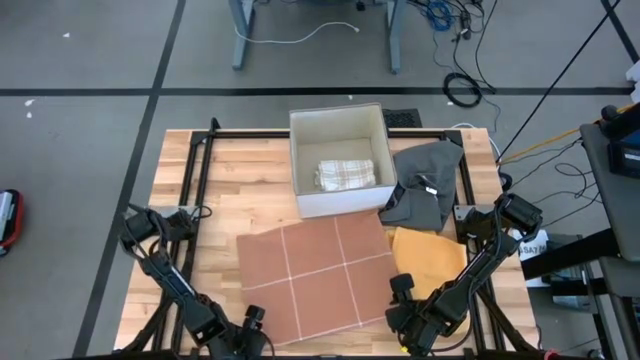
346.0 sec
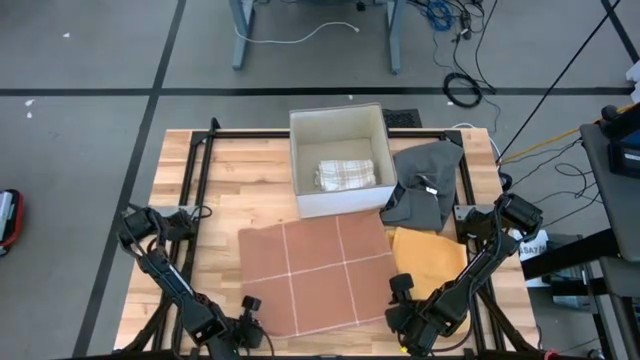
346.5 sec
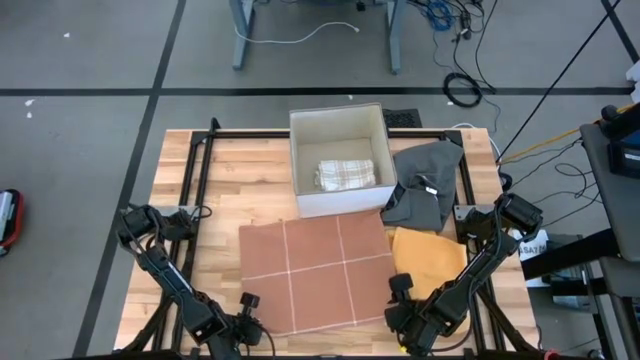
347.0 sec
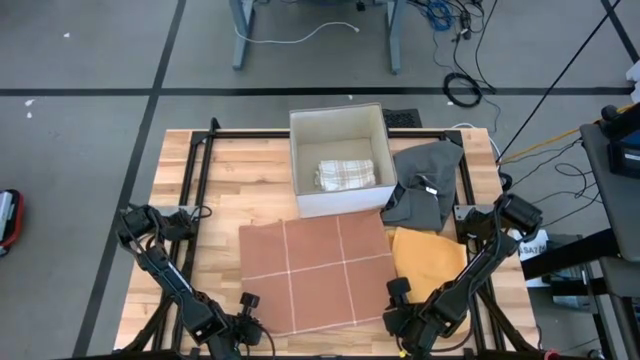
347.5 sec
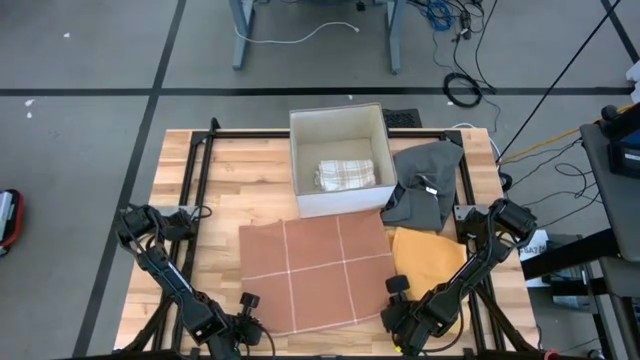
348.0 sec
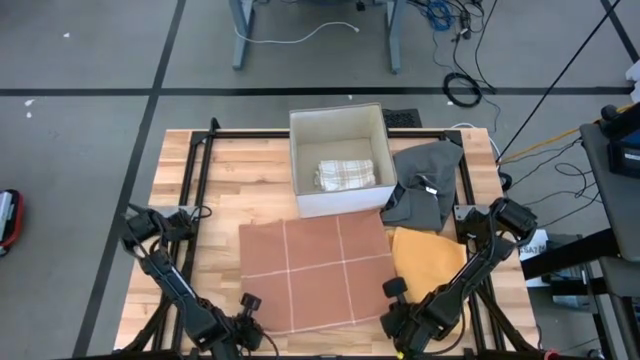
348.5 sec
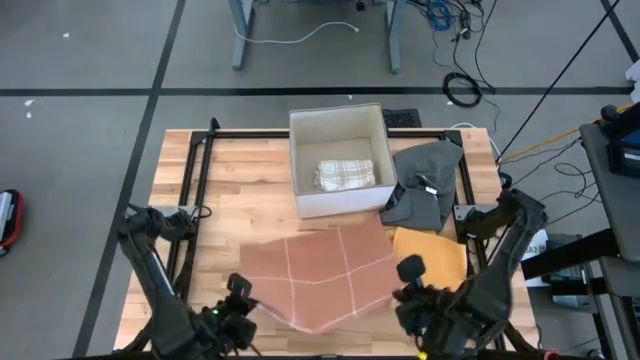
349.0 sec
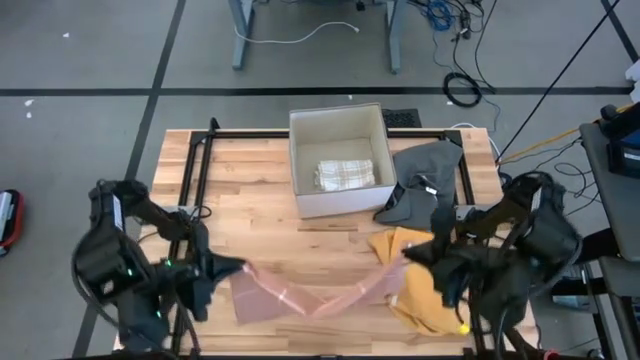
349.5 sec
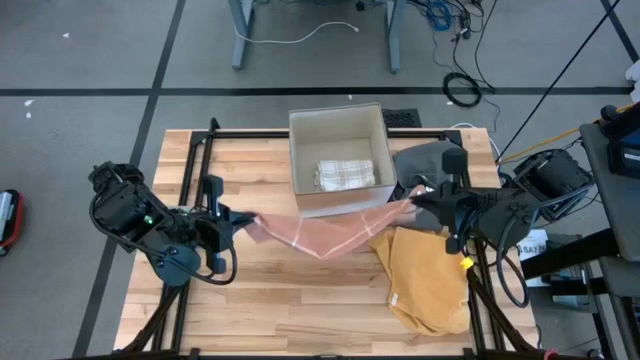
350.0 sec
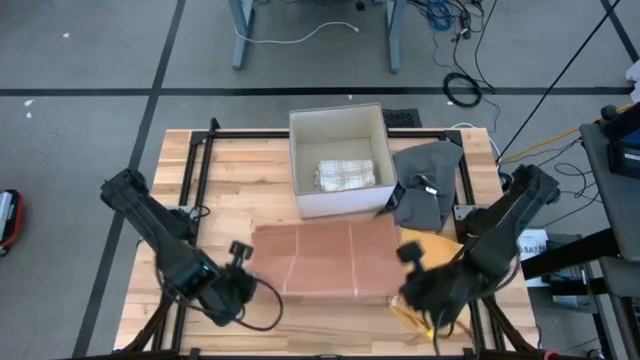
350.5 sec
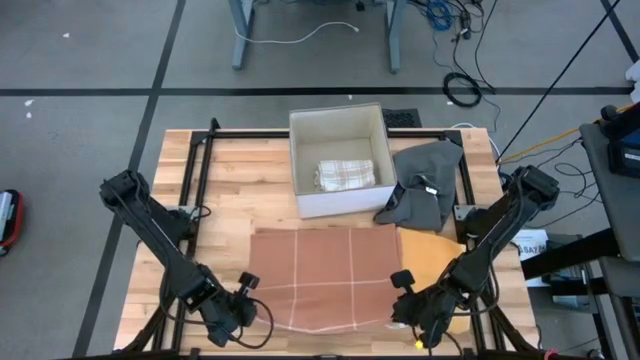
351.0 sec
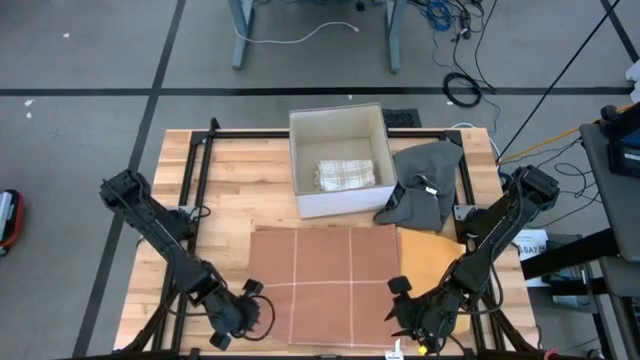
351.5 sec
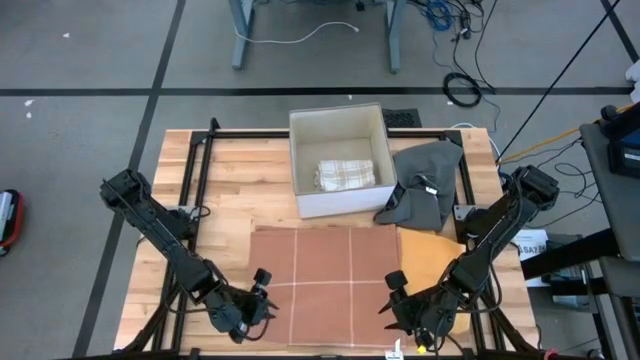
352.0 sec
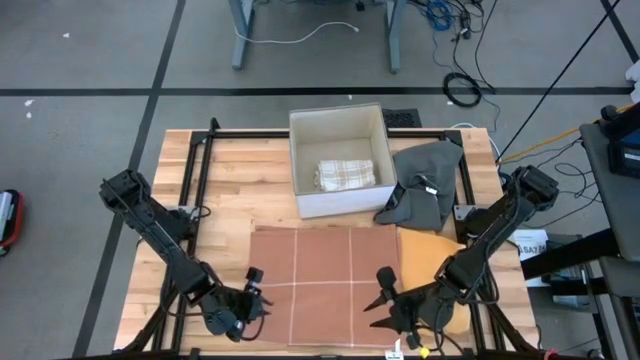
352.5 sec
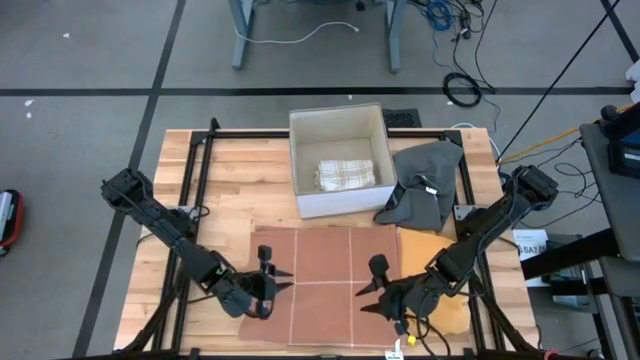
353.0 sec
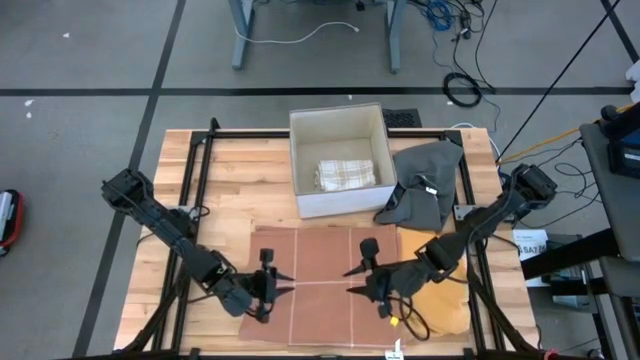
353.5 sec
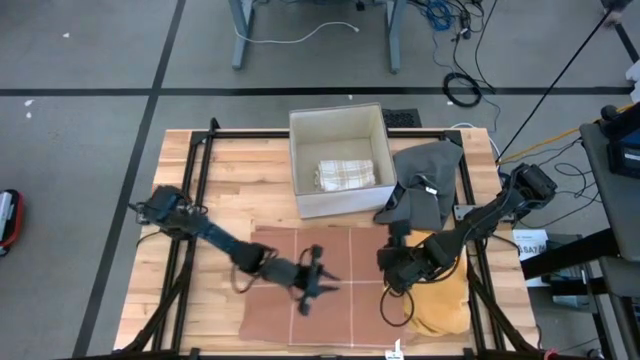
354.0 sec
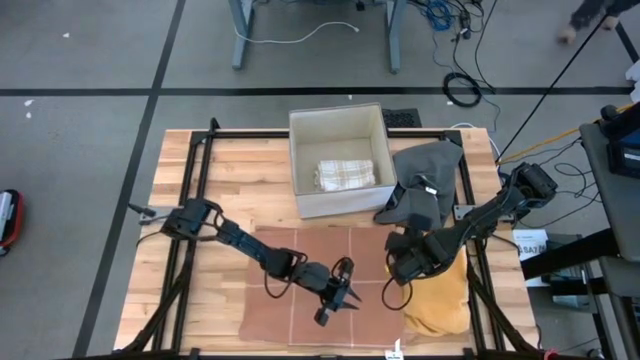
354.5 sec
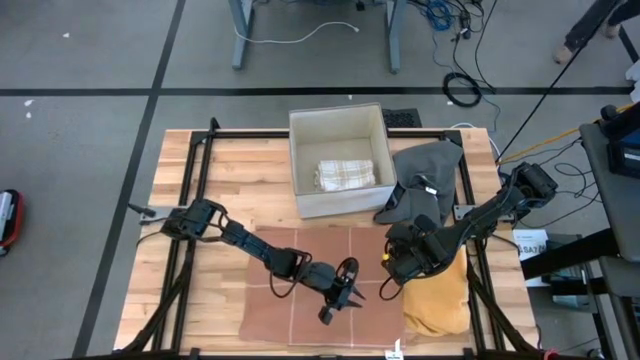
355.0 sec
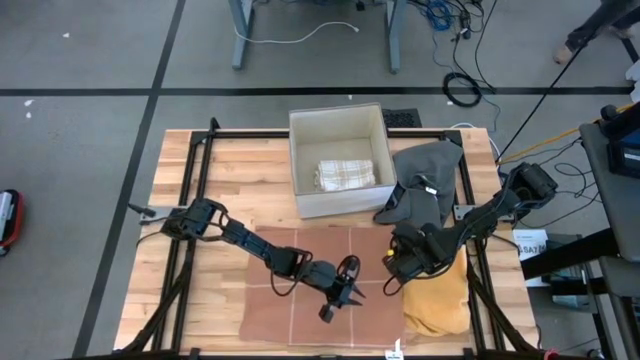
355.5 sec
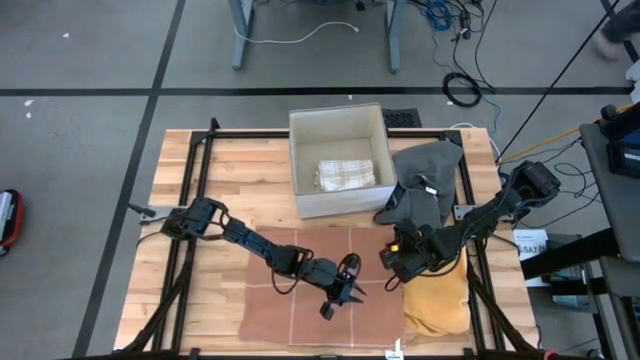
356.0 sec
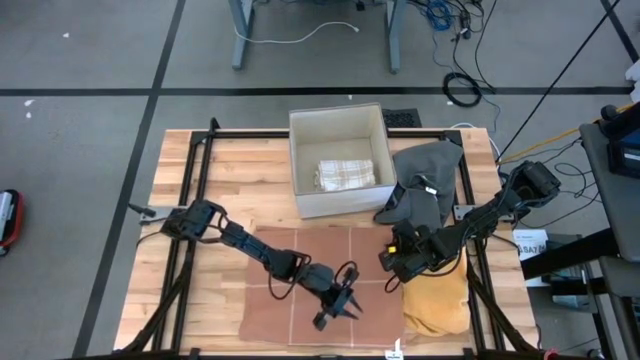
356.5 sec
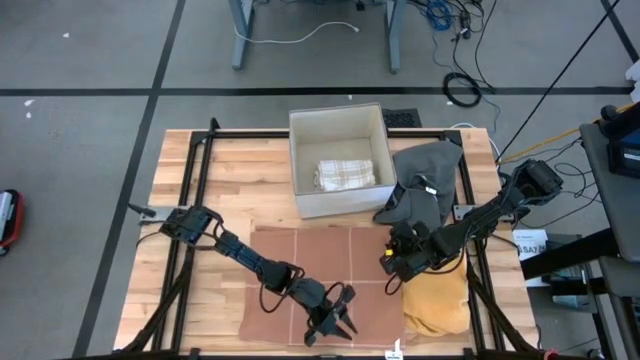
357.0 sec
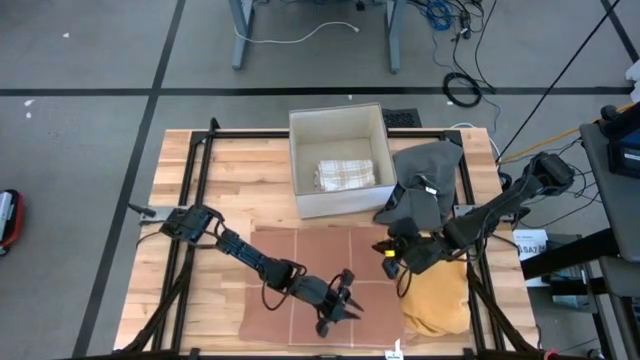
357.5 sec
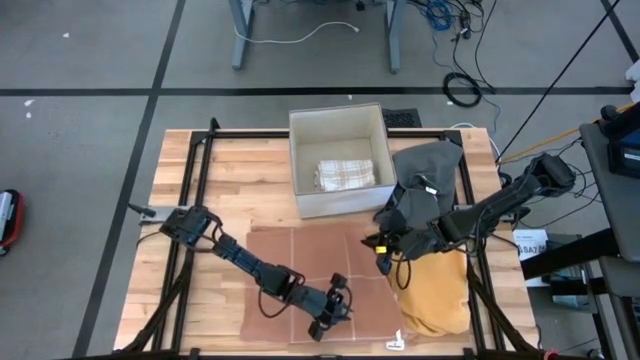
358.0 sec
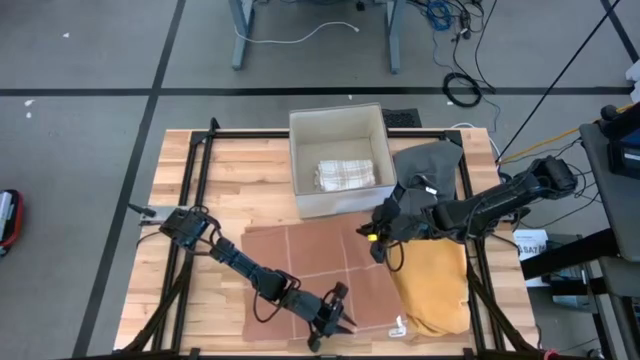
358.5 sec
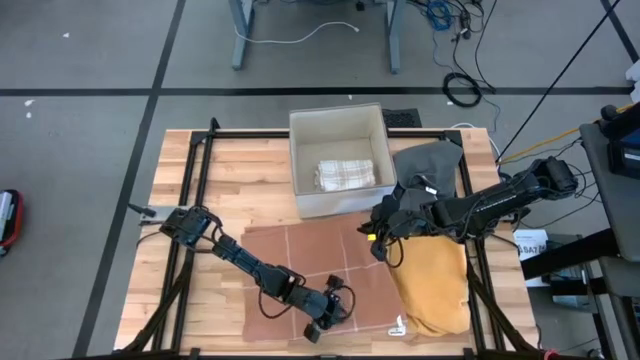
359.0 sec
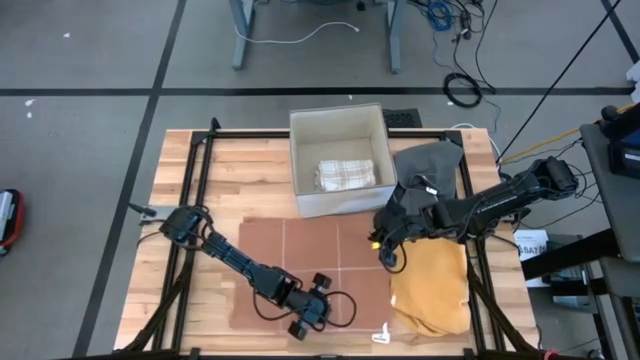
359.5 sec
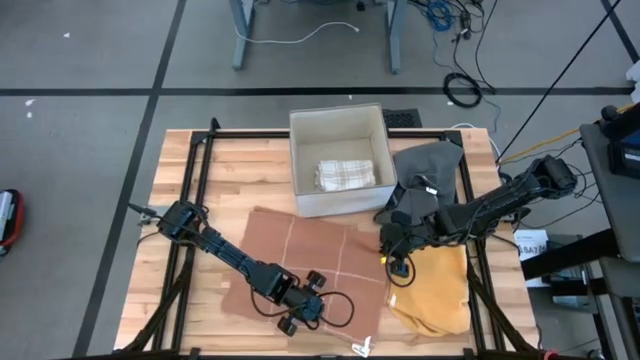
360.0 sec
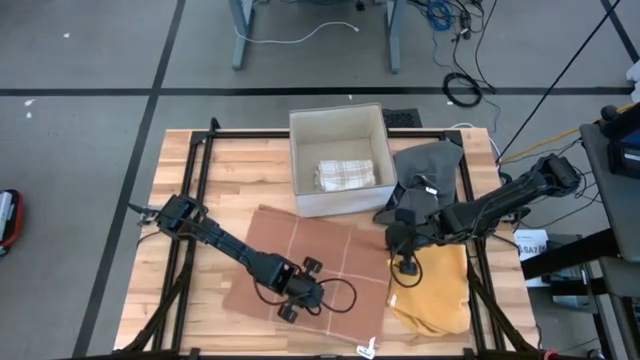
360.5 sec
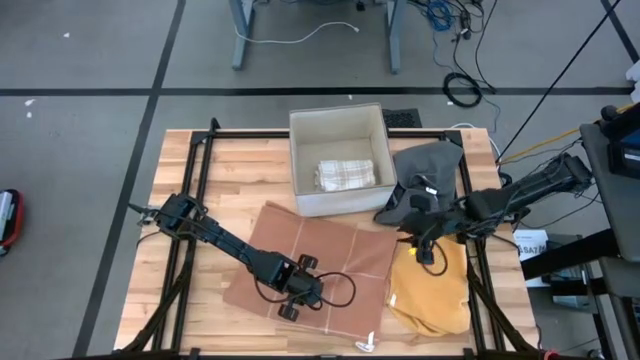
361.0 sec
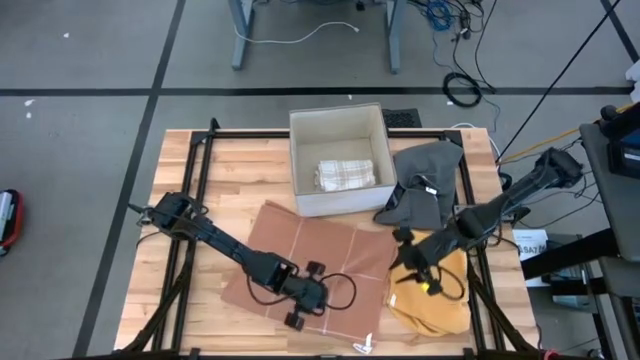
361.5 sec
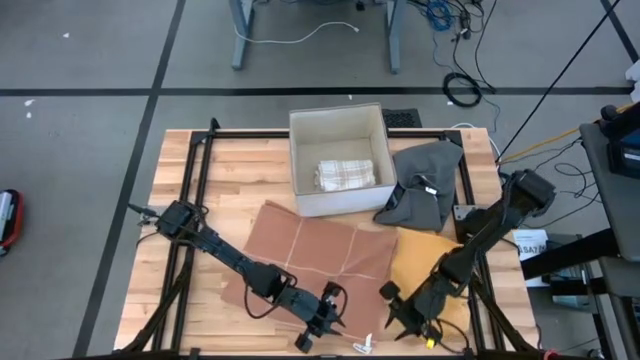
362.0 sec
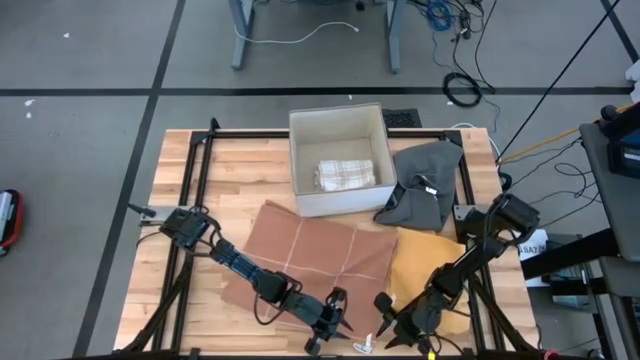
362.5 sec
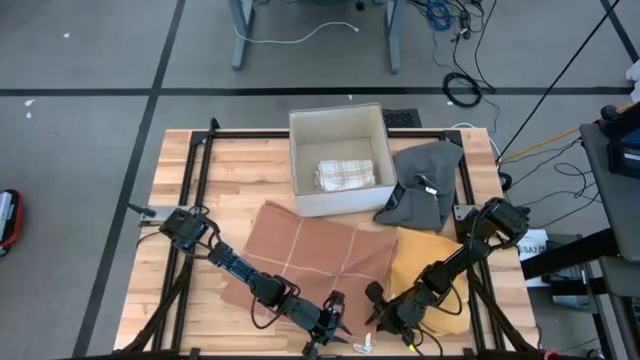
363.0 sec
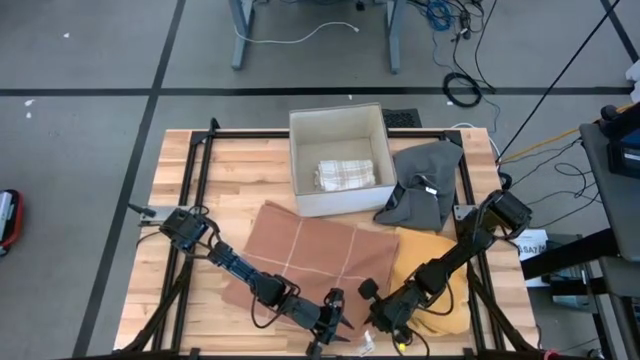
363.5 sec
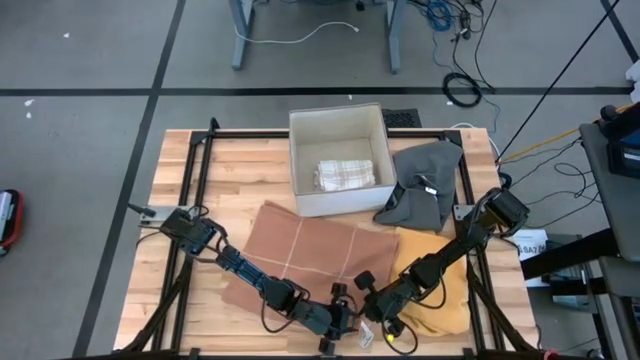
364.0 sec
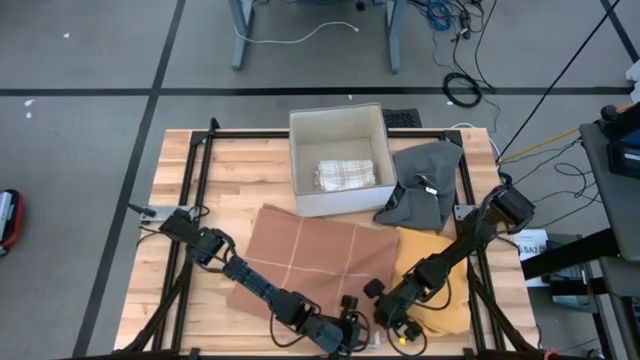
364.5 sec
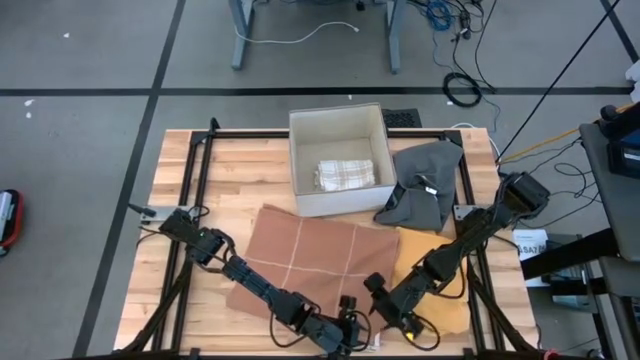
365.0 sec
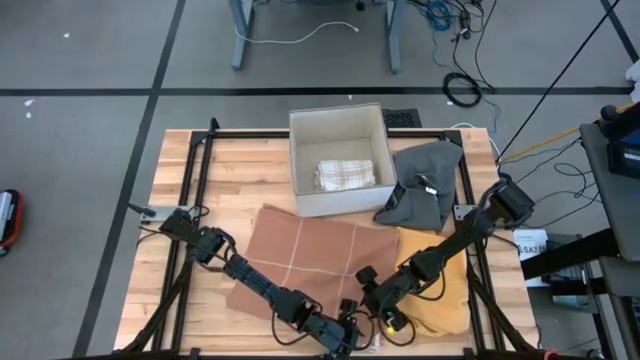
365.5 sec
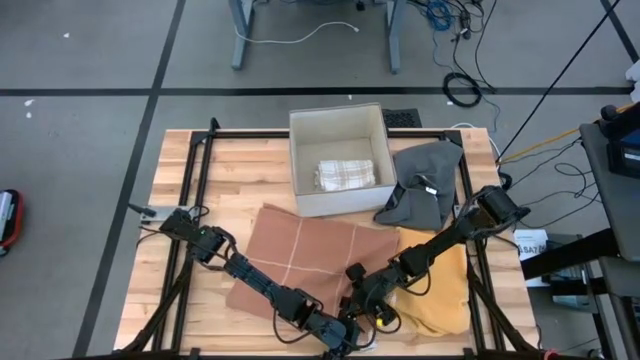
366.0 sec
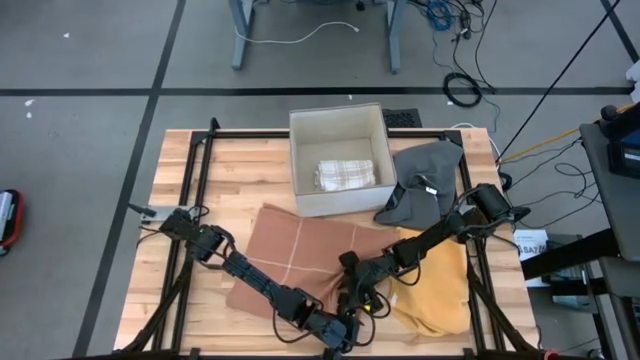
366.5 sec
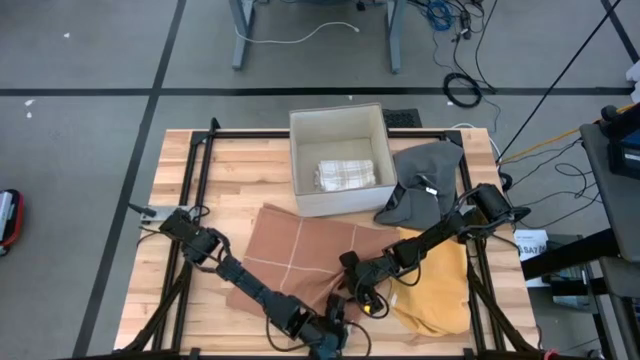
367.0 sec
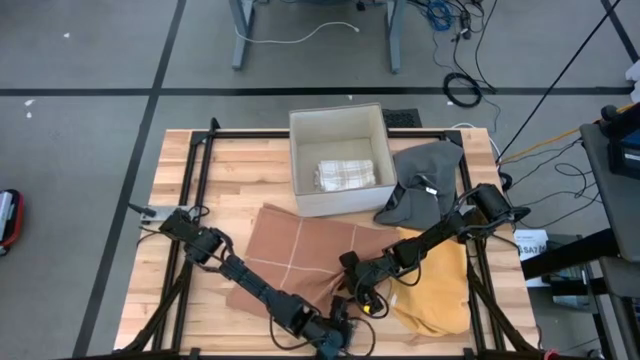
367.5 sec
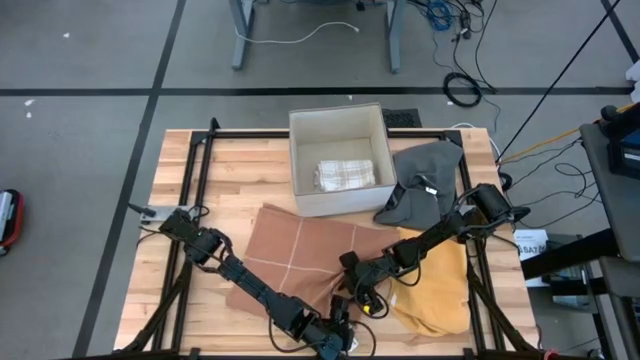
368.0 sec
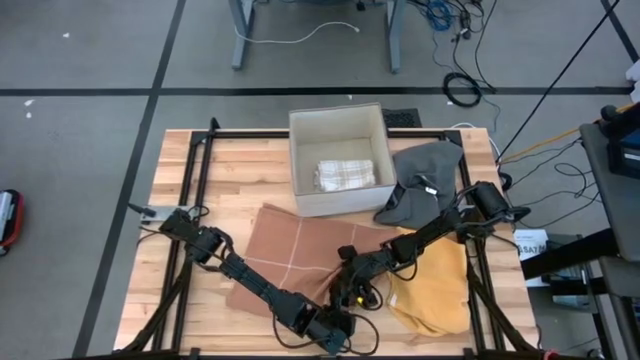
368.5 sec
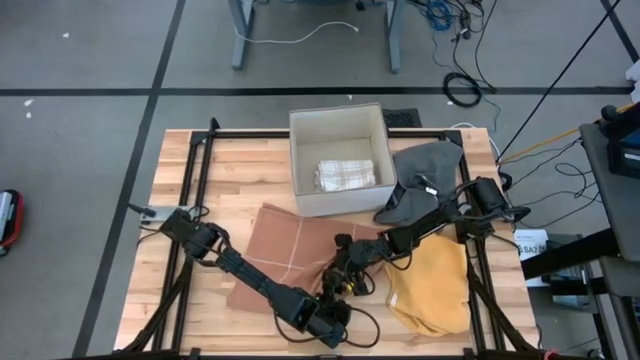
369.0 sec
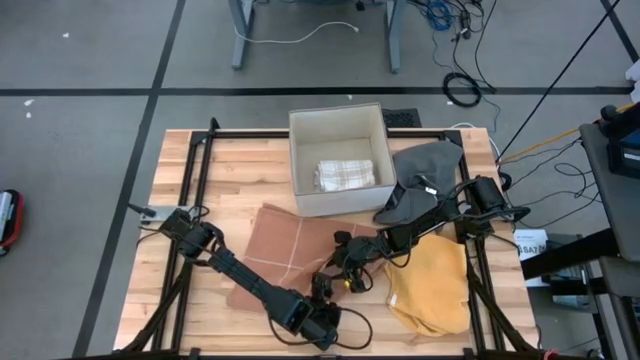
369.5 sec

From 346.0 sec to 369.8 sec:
Task: Fold towel
Fold the light brown towel
